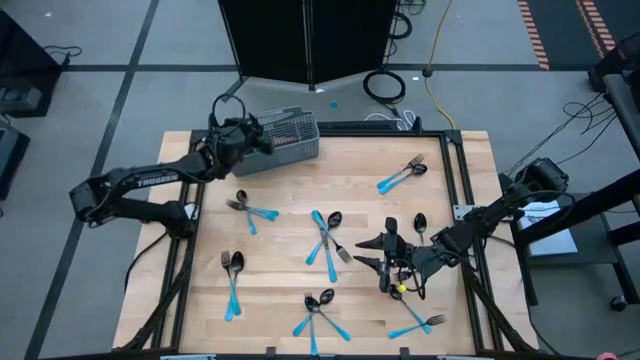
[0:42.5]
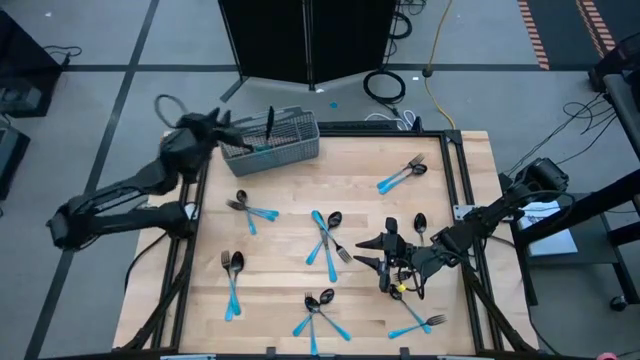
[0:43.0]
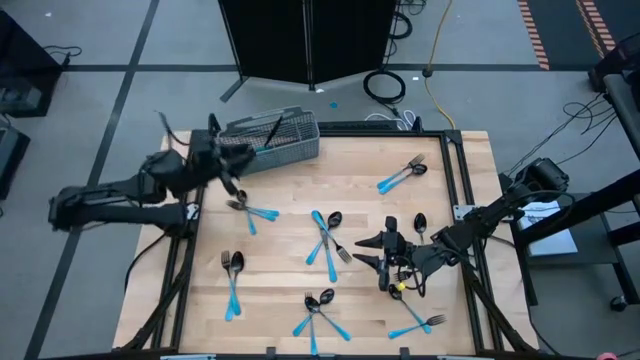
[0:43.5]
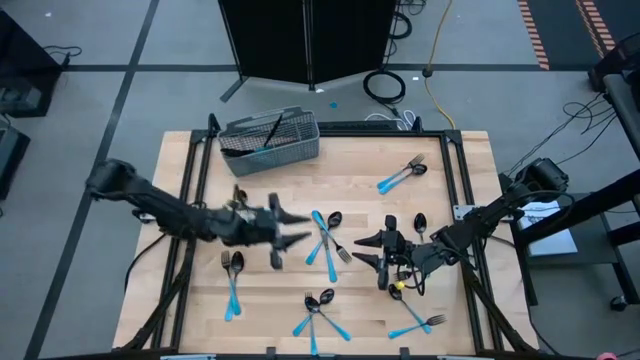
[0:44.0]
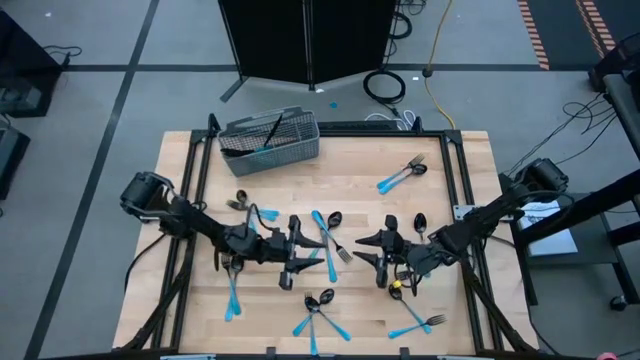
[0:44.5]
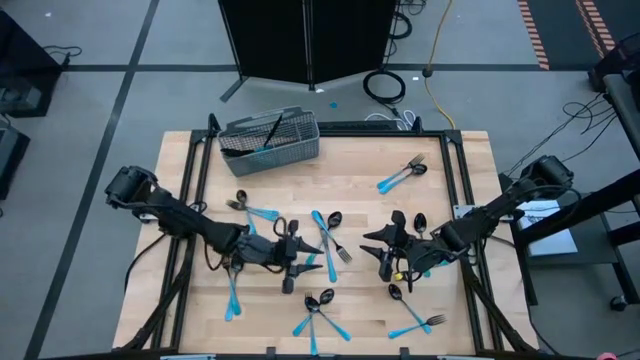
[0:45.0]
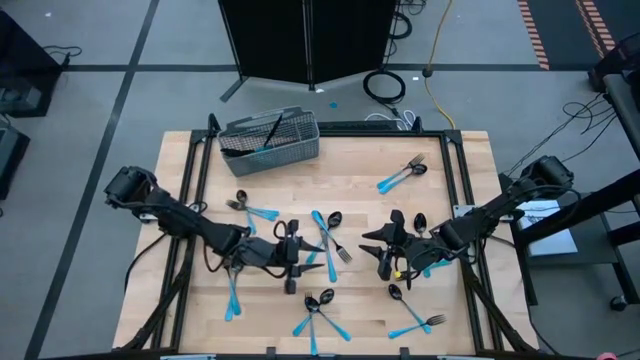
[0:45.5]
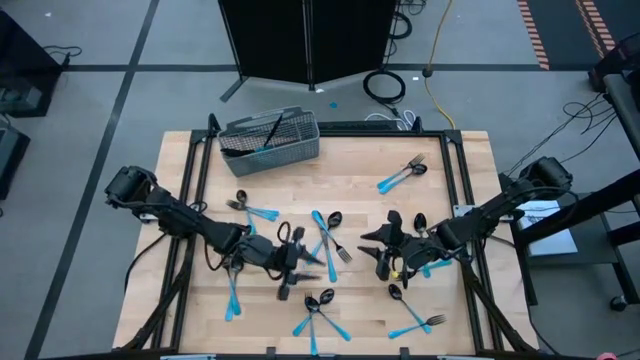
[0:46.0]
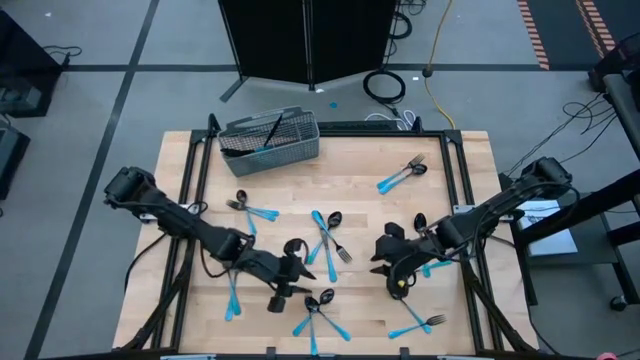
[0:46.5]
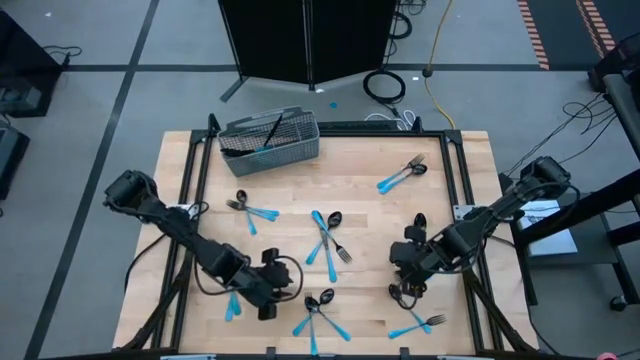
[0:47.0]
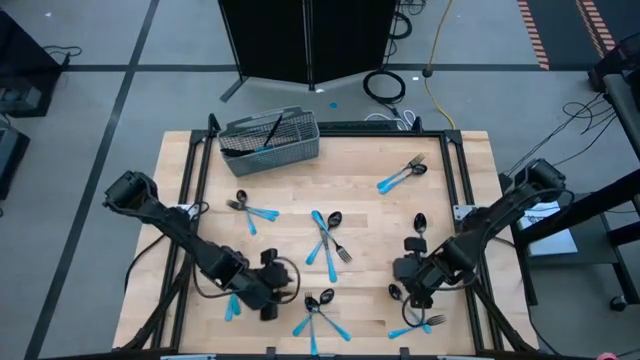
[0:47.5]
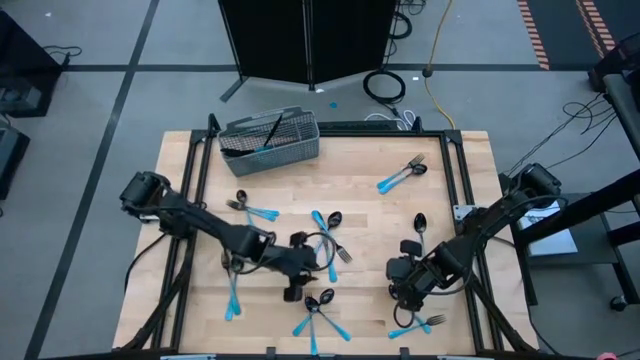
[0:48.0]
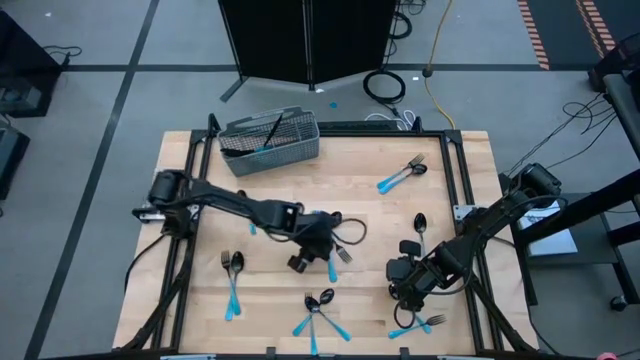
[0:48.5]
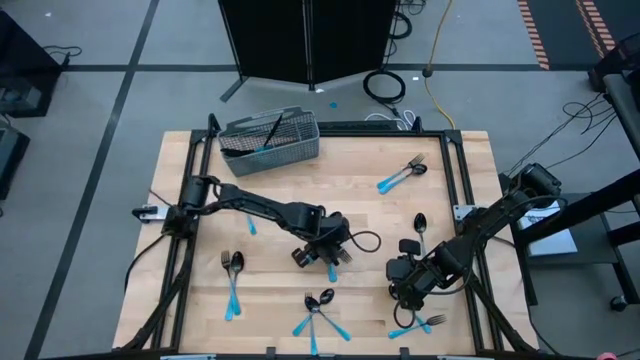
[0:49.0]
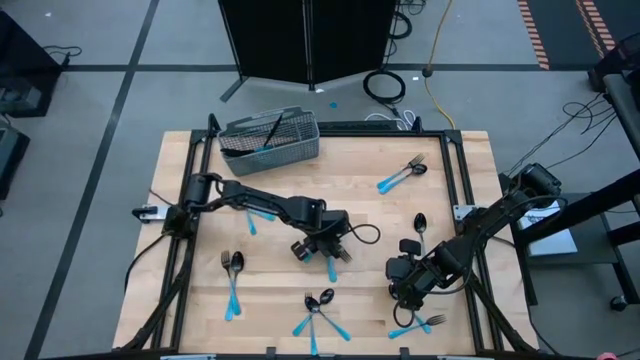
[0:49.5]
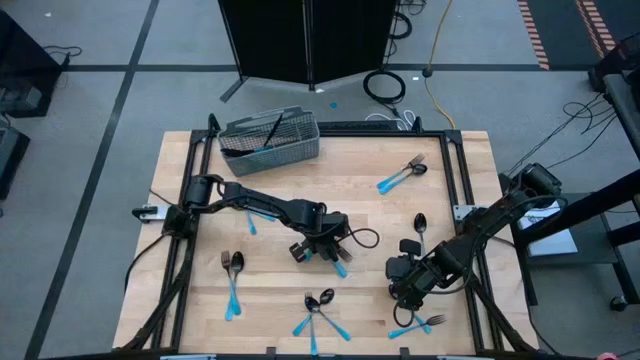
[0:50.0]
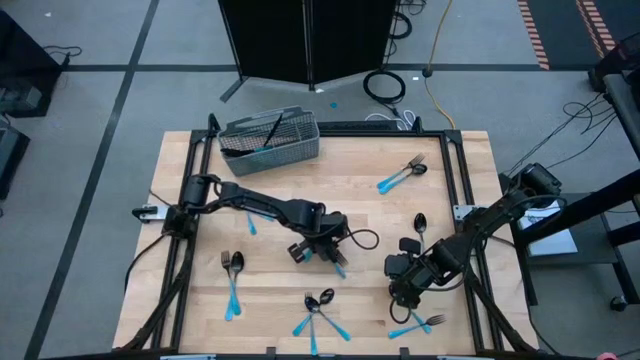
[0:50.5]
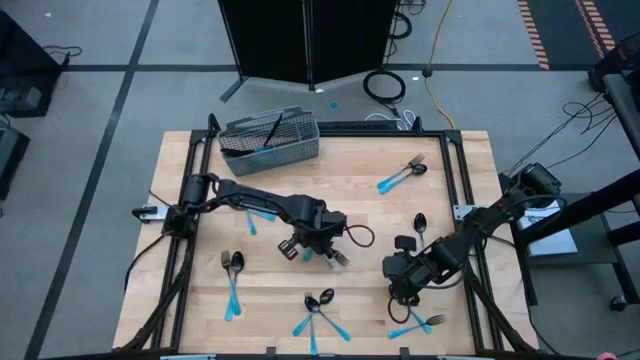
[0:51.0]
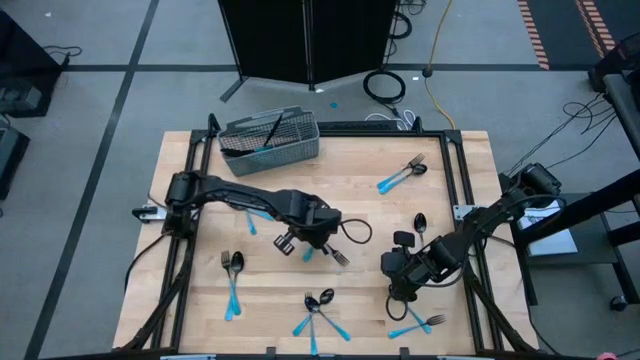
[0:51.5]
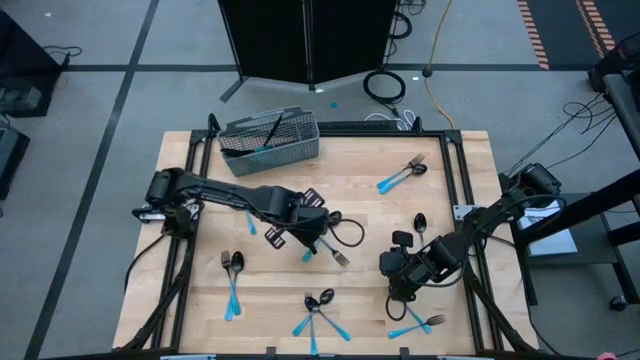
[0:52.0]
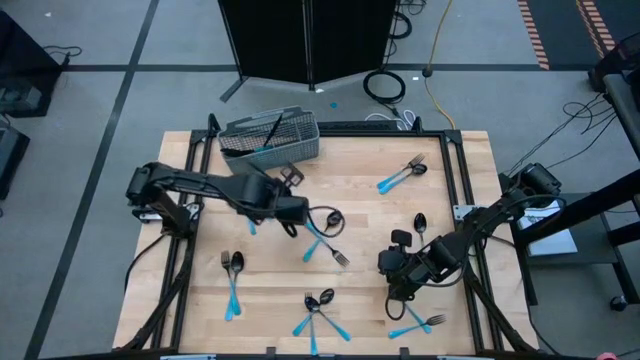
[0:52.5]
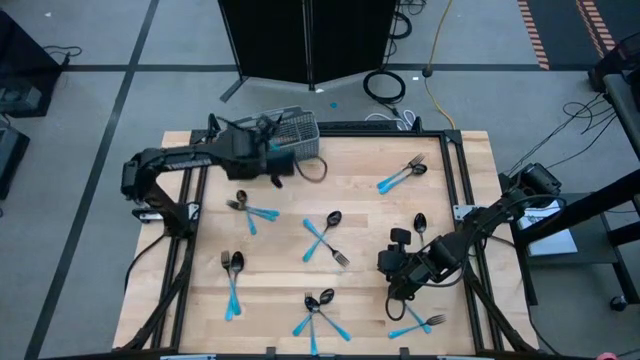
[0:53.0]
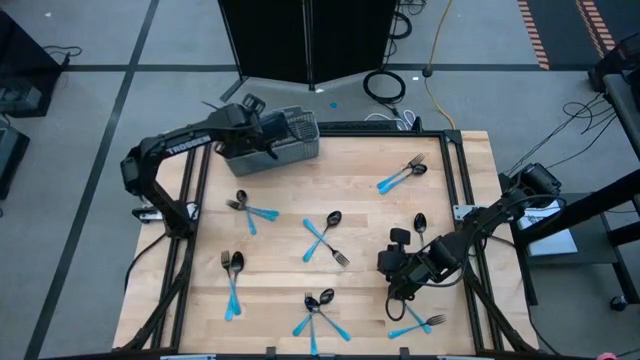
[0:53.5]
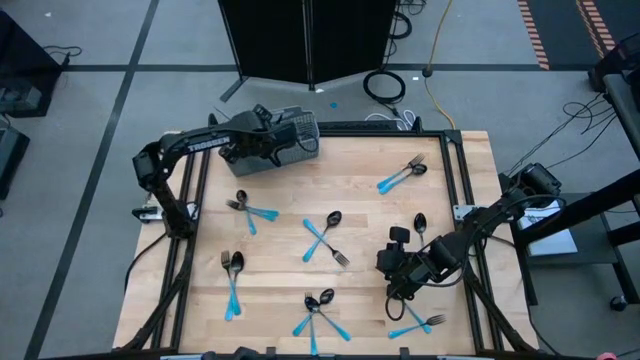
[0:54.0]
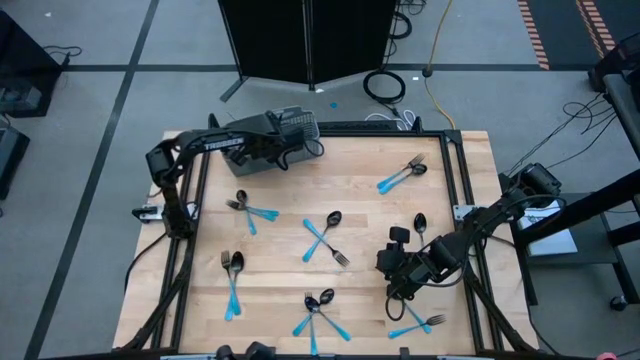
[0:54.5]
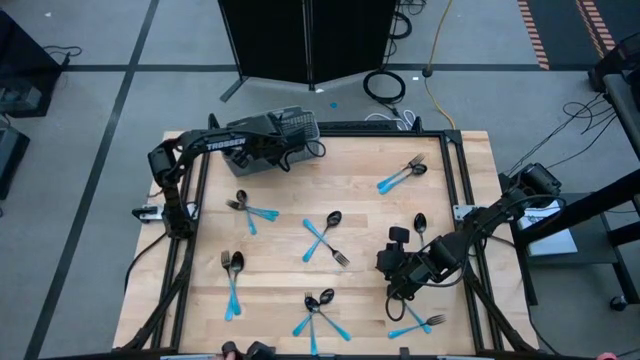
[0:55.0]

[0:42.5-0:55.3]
Task: Sort silverware
Put the blue knife into the silverware basket

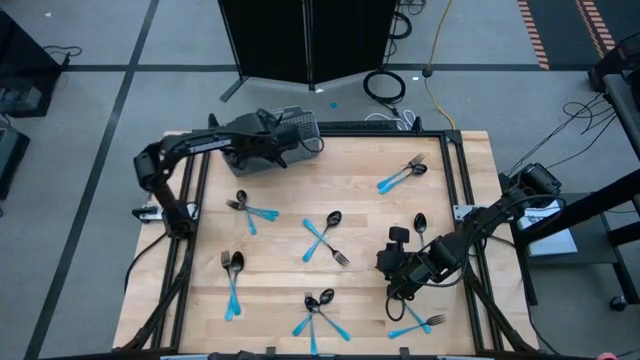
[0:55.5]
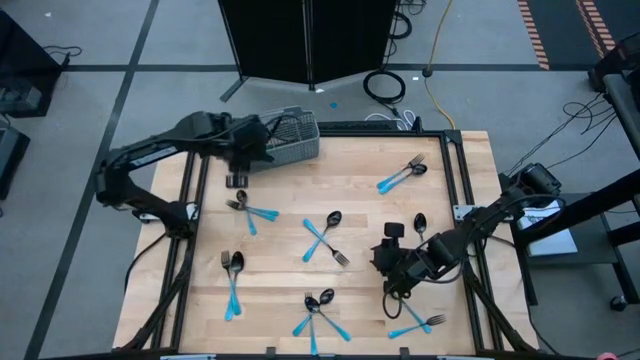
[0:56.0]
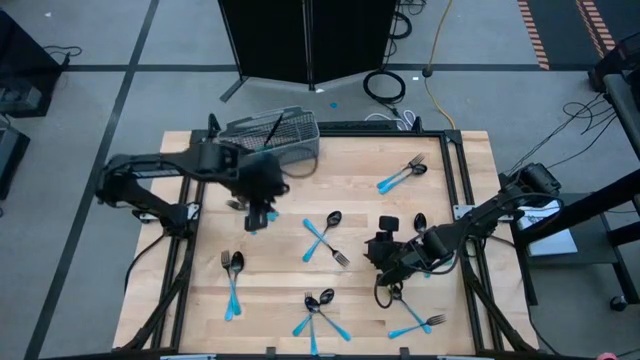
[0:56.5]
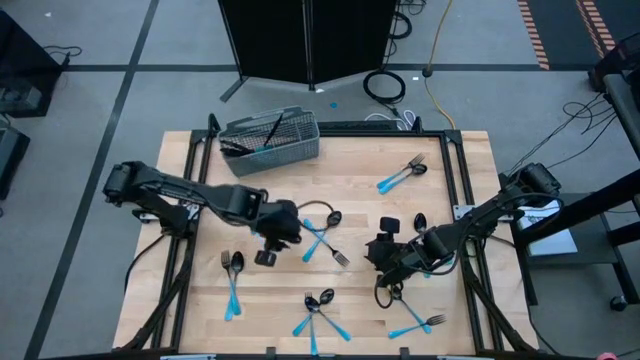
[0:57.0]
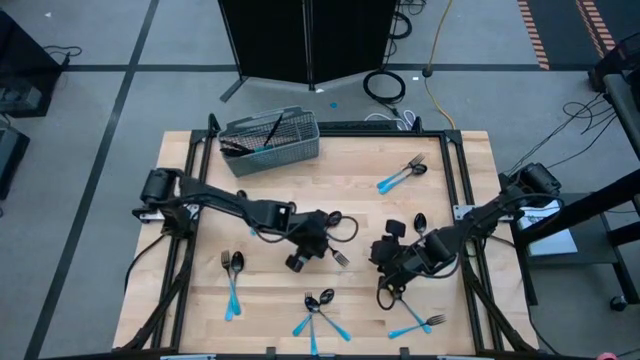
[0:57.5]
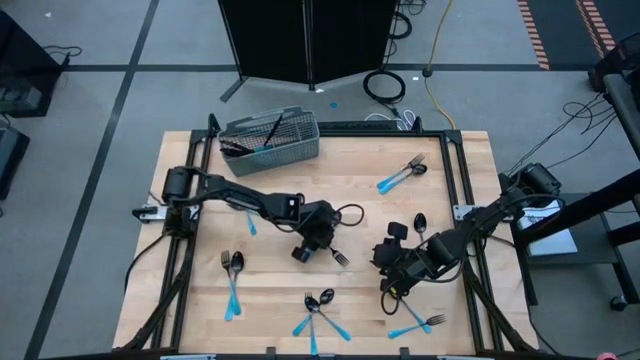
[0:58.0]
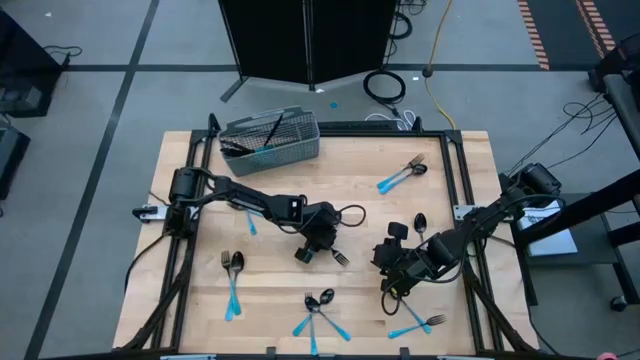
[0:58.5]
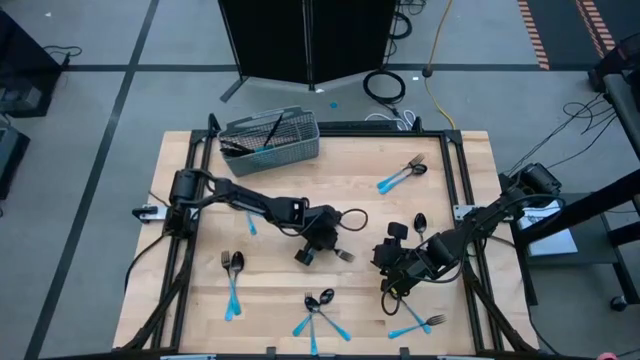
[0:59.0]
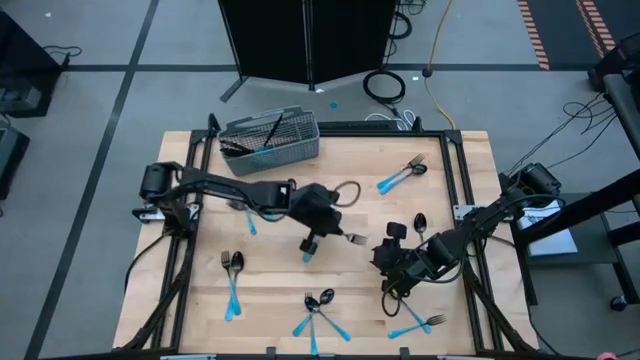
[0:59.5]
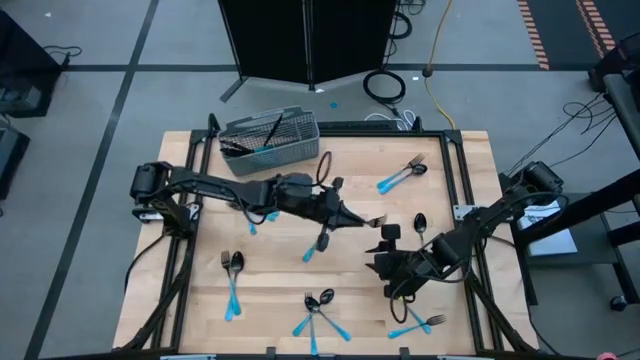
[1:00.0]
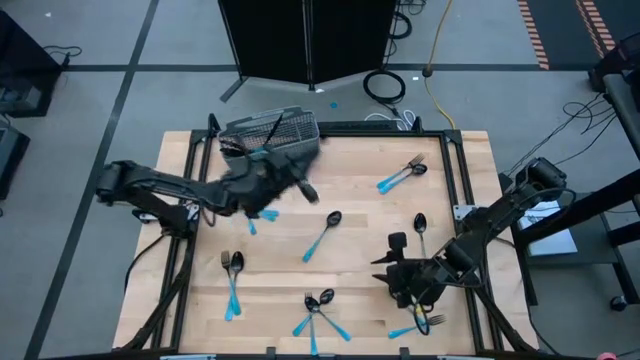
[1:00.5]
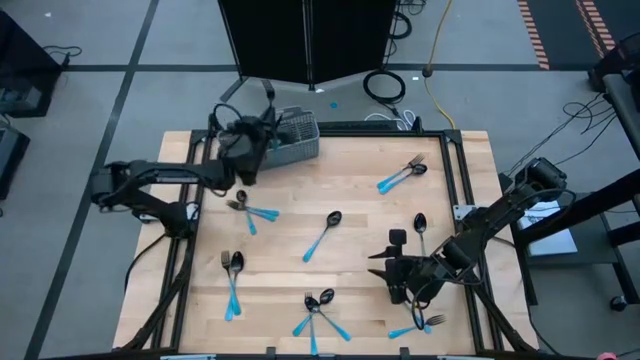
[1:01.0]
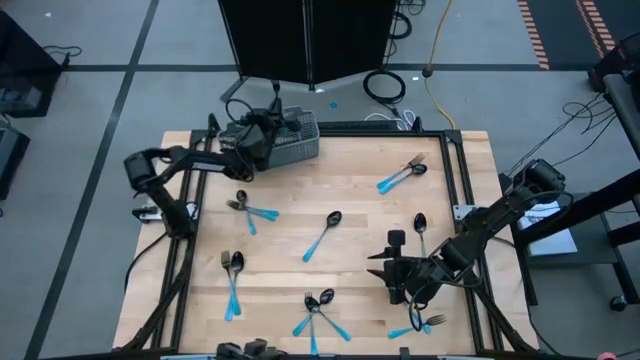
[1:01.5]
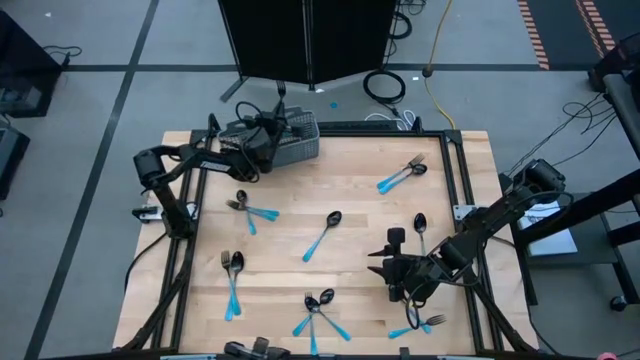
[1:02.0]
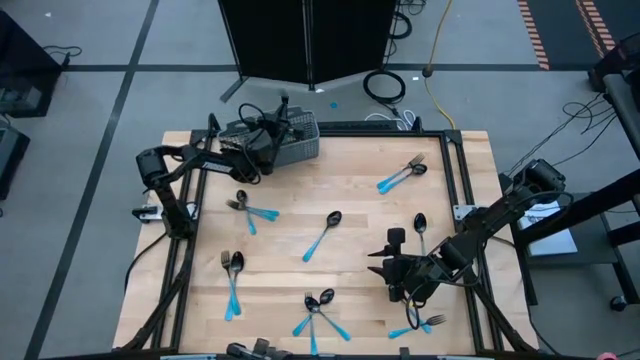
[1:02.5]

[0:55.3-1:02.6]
Put the blue spoon into the silverware basket
